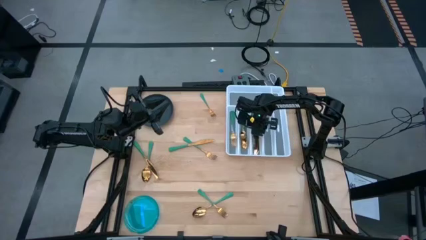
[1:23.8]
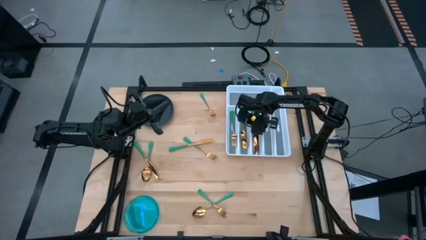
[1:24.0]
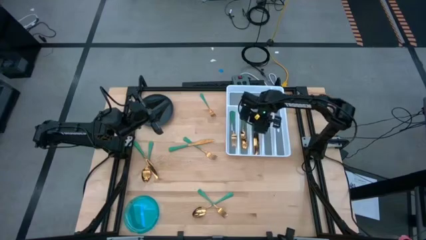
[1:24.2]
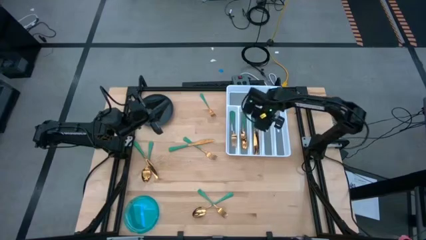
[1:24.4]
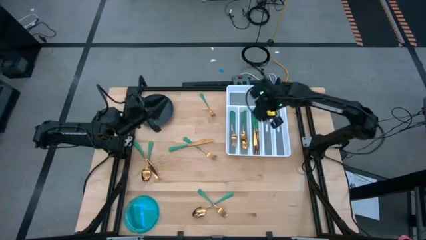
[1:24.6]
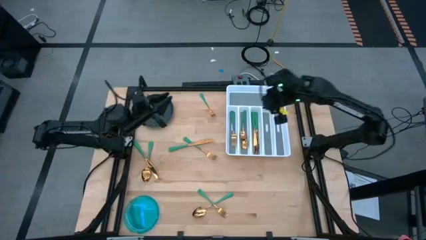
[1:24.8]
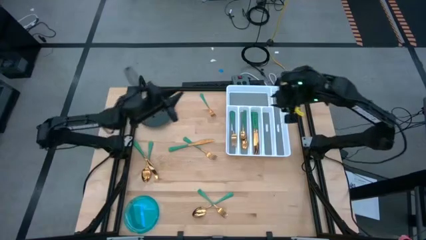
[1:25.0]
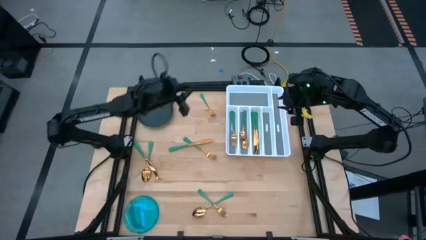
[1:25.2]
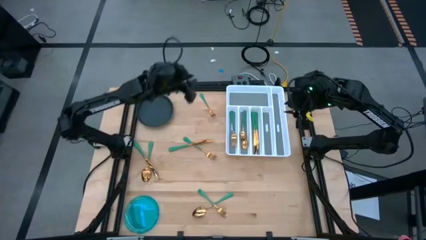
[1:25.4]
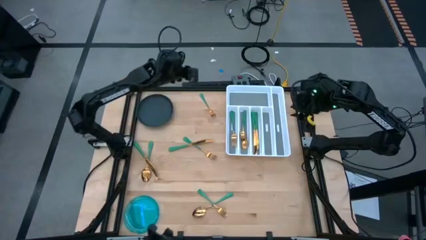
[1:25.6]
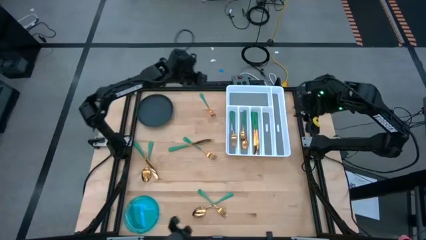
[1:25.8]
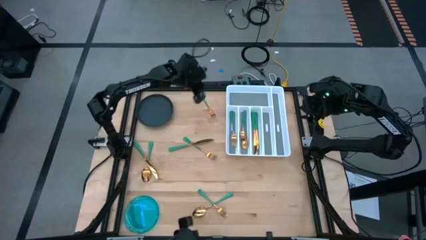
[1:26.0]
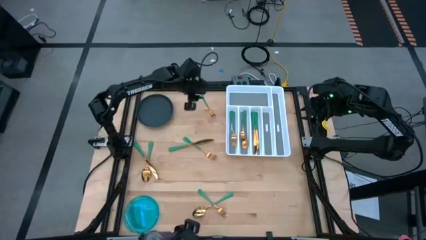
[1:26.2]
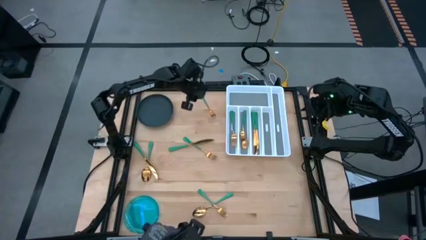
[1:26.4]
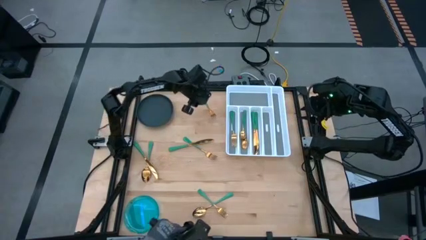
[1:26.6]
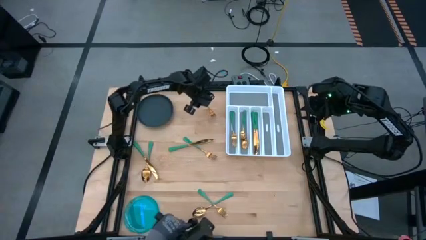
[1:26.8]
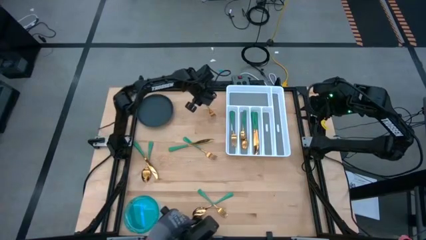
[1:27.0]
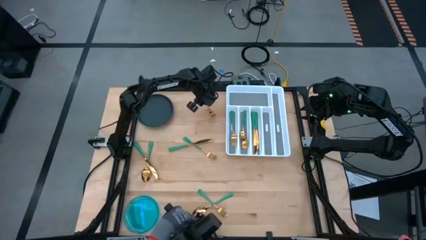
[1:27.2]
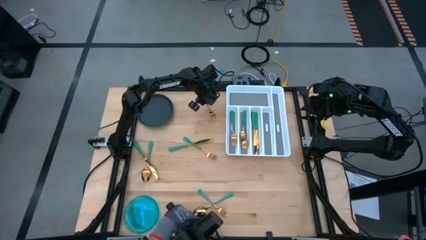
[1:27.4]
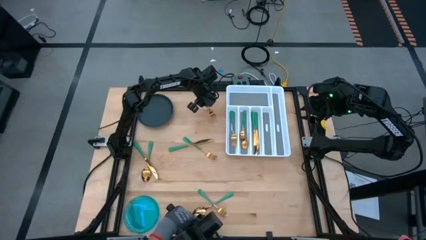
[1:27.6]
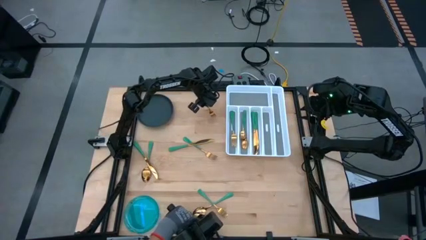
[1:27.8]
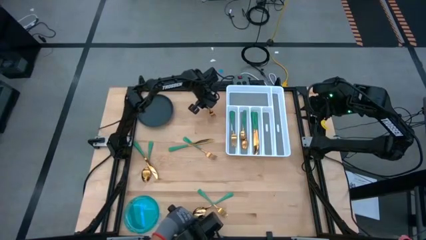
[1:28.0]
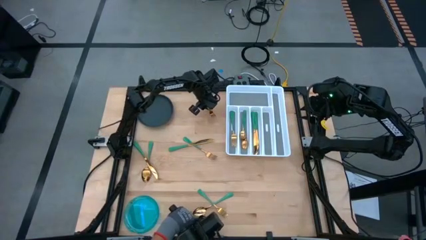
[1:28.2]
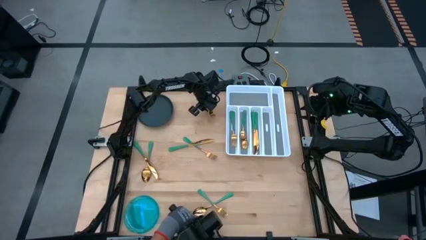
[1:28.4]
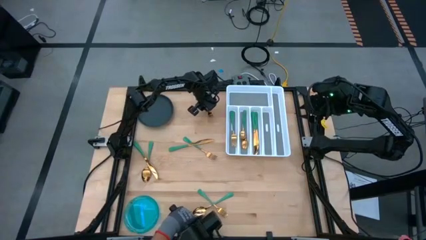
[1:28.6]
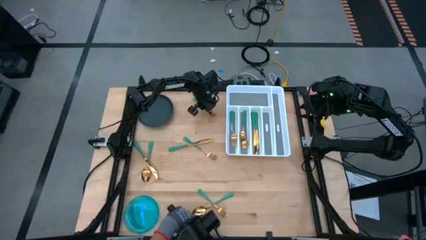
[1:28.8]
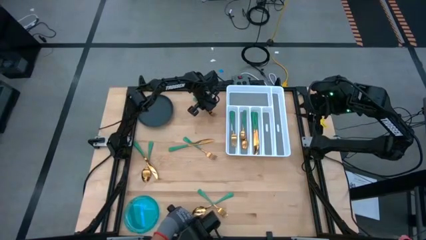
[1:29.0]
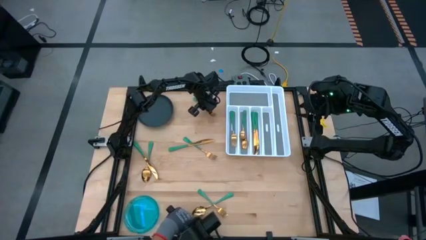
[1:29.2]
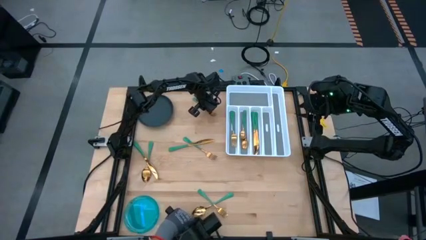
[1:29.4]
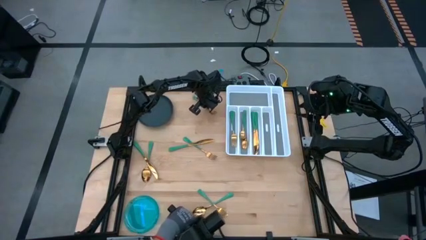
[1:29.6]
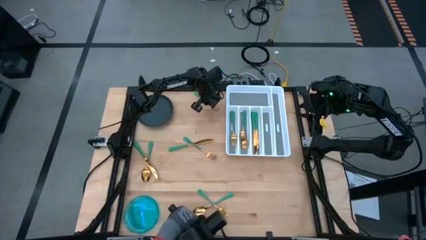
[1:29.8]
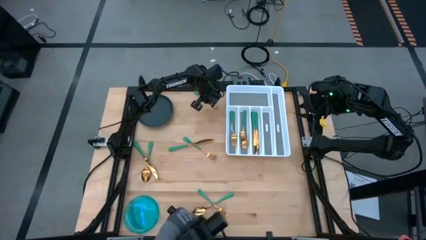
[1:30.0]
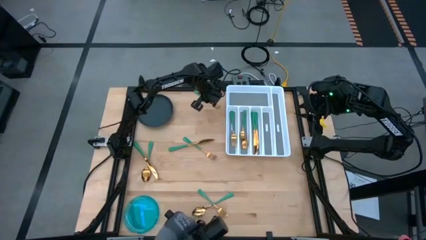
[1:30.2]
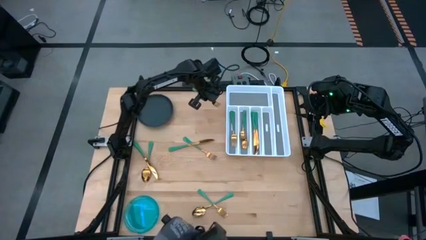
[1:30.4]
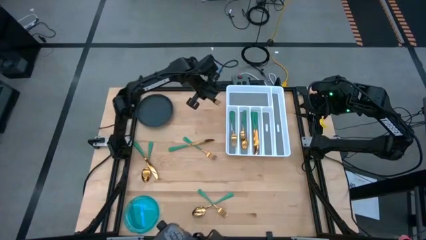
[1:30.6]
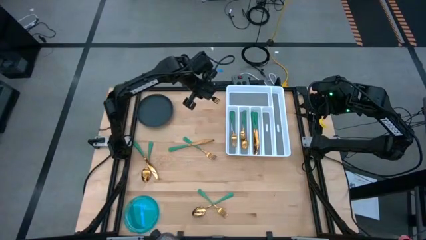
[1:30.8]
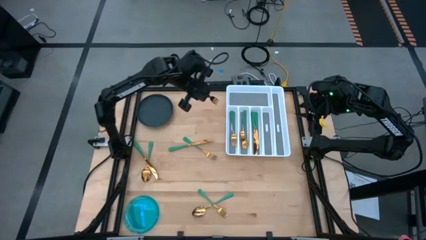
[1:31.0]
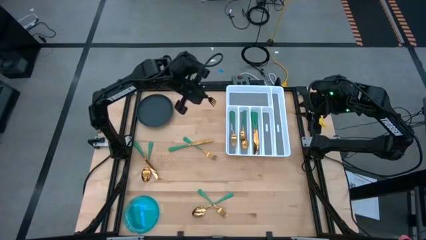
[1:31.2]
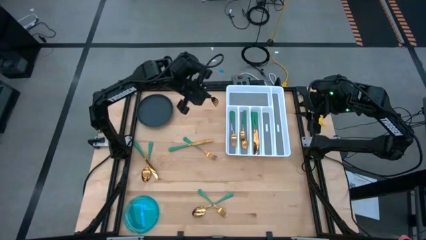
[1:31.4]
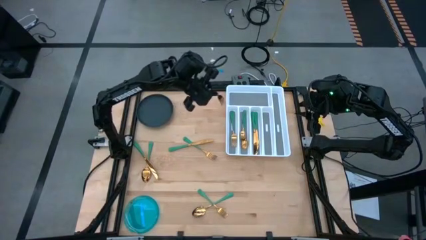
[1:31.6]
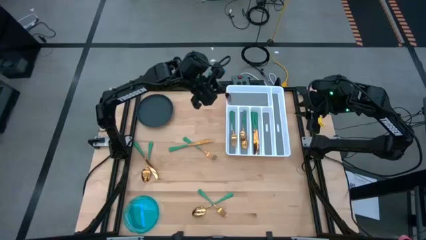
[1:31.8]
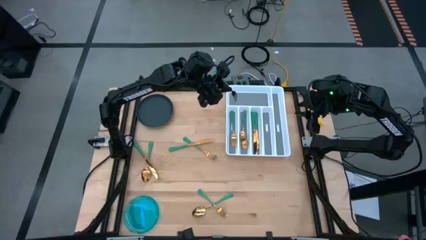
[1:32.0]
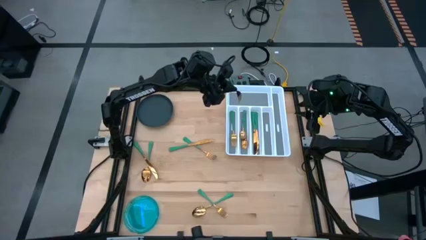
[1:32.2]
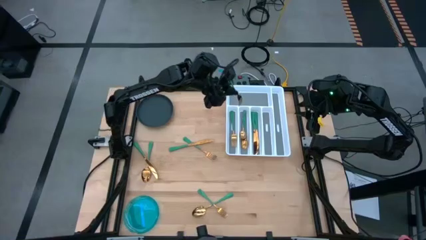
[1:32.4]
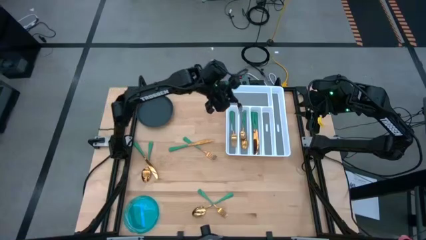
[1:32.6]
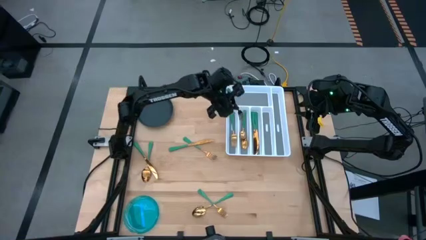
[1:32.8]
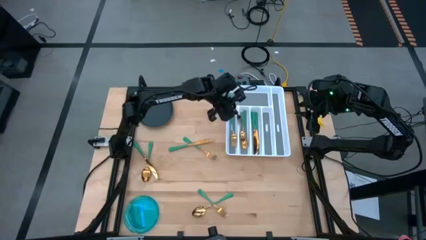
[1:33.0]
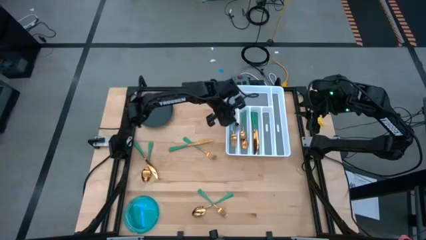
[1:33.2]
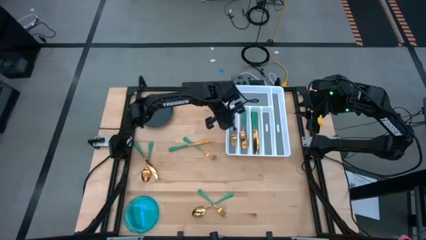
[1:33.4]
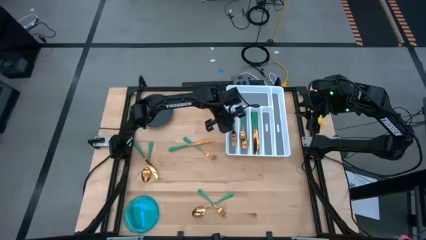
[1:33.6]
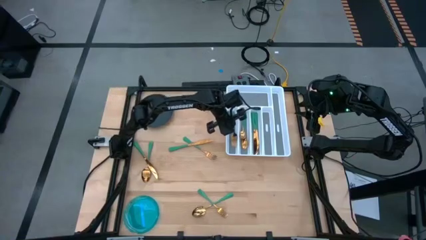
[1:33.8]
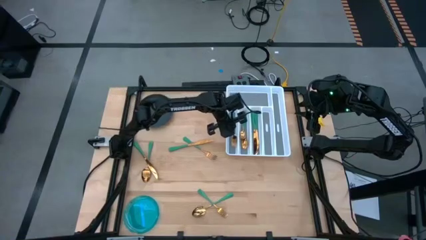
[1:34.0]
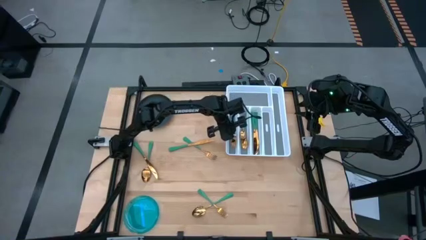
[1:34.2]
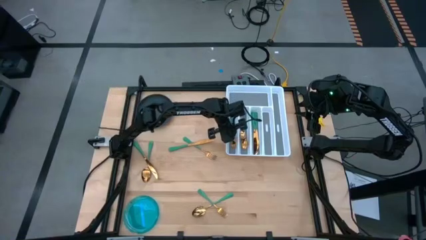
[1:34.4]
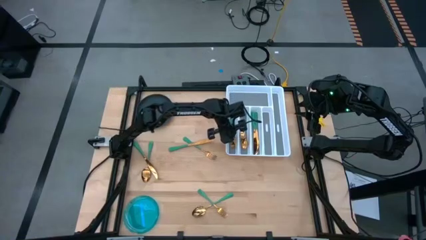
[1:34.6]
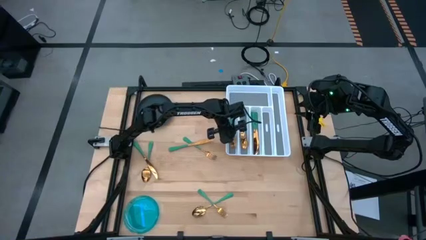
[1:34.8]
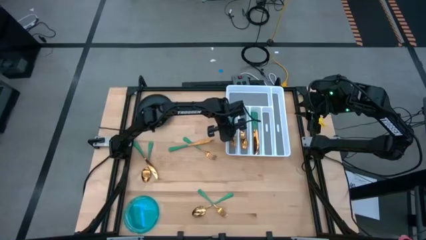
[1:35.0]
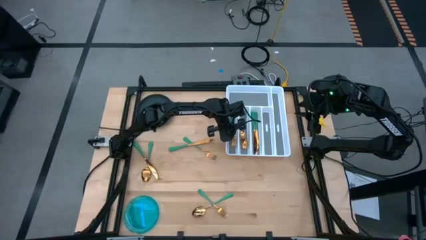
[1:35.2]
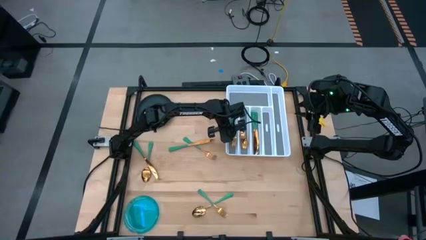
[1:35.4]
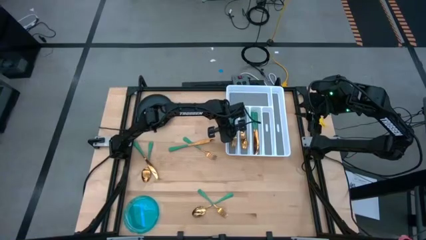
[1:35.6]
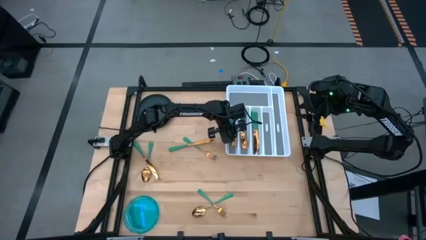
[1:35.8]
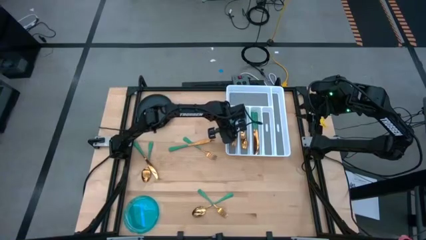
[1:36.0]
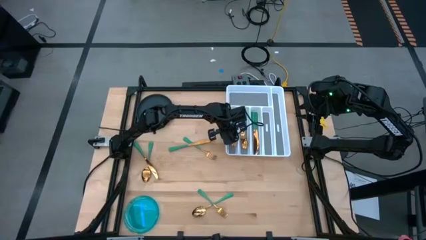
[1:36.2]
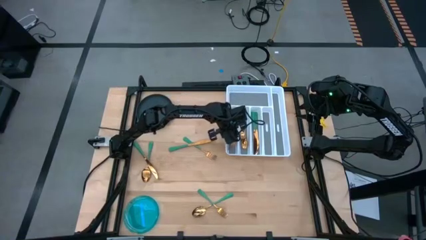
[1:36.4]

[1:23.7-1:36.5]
Task: Sort silverware
Put the green fork into the white silverware organizer

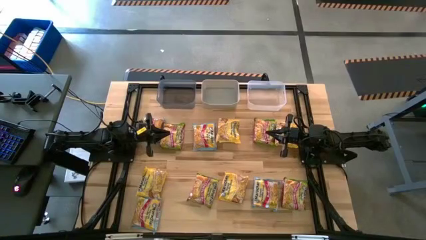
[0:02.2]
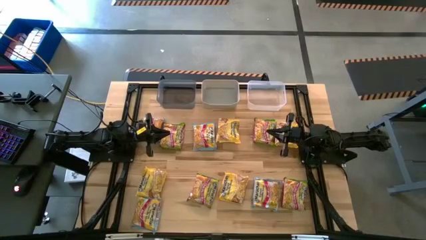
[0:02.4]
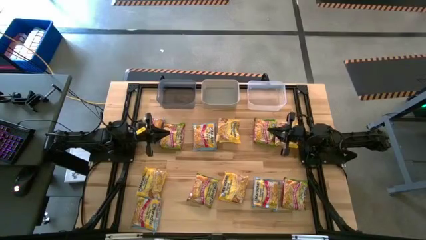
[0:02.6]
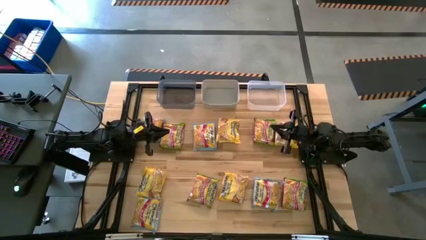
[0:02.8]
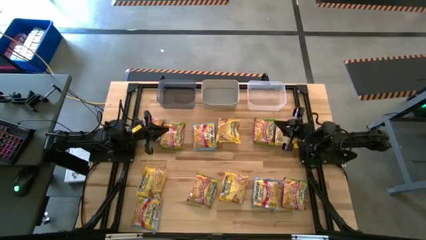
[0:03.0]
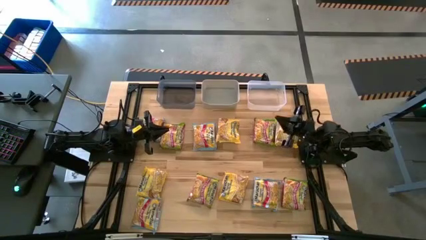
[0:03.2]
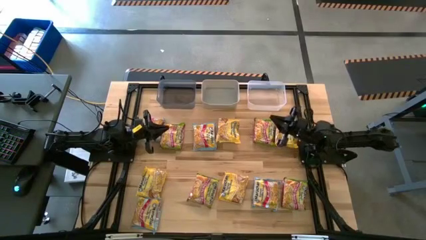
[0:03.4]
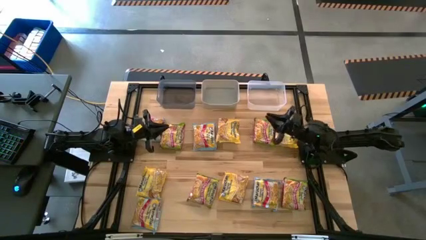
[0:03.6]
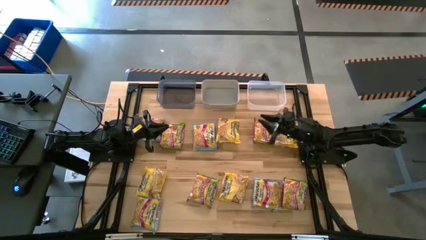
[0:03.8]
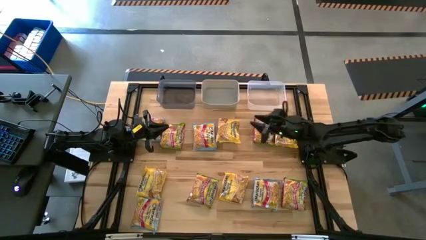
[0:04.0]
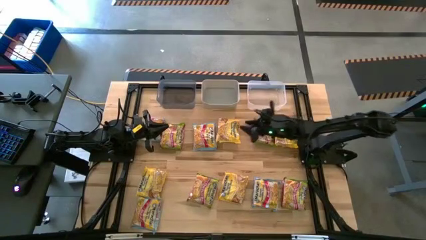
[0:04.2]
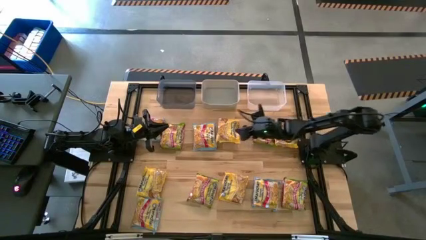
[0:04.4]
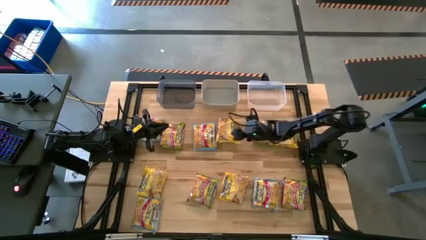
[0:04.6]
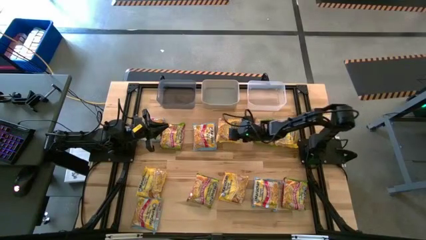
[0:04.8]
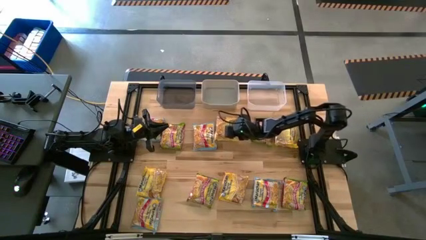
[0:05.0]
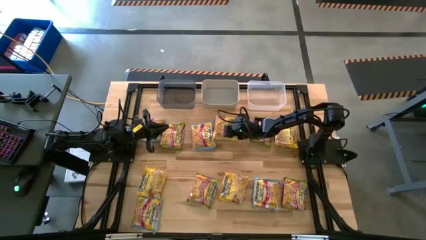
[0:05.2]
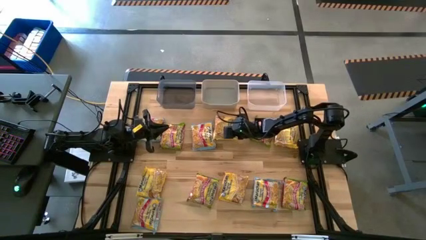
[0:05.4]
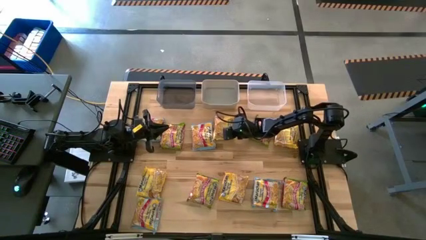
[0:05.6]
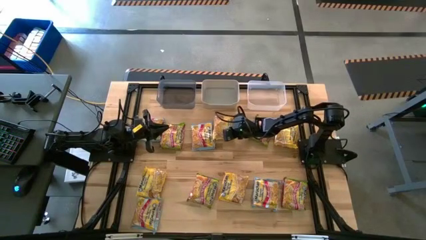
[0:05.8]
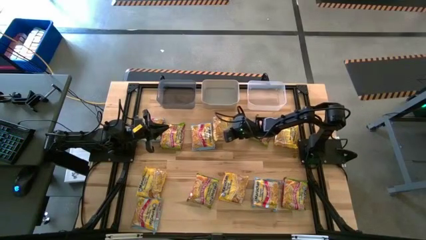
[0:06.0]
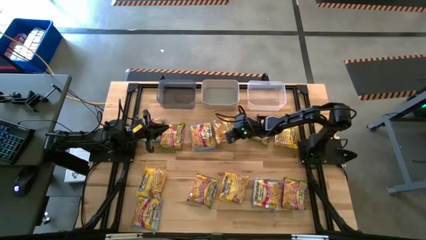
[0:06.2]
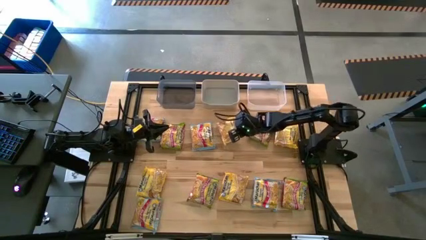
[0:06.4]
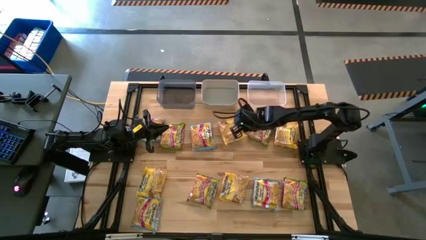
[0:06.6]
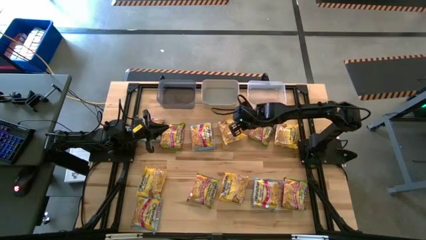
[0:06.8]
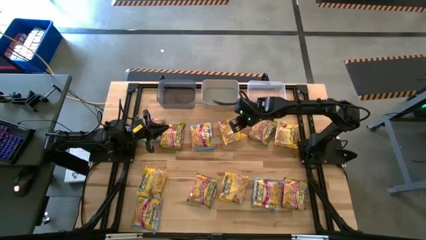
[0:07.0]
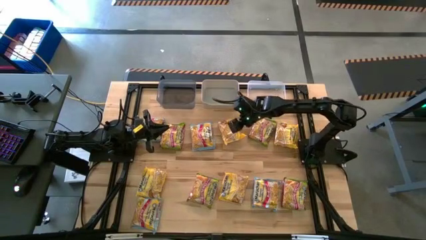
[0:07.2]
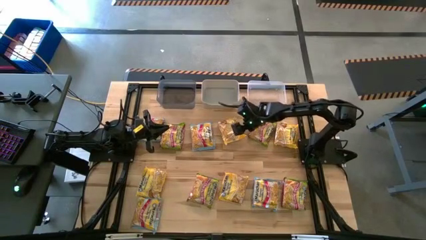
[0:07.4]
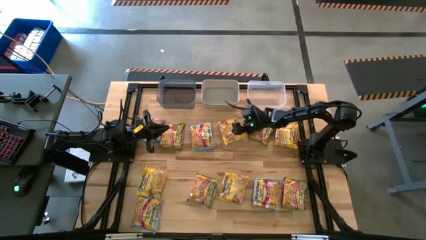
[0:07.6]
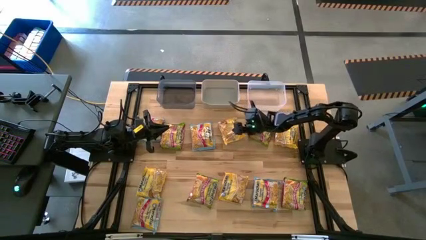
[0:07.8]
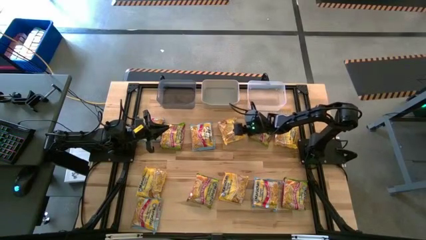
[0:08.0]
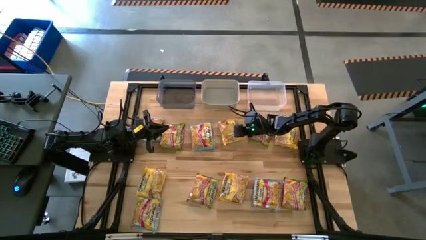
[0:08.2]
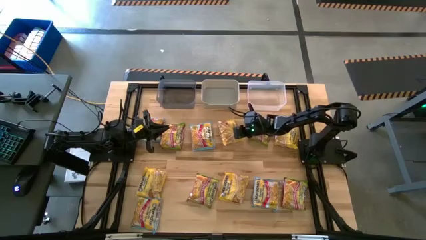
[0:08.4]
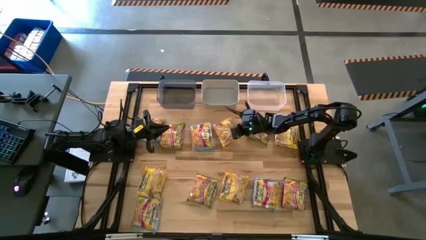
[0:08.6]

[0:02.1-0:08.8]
Task: Sort Maruchan noodles
Put the yellow noodle pack into the transparent bin
